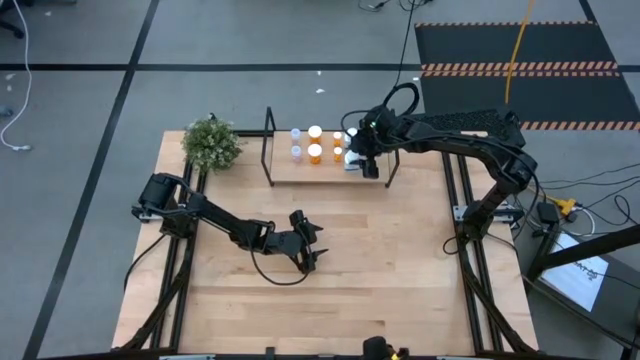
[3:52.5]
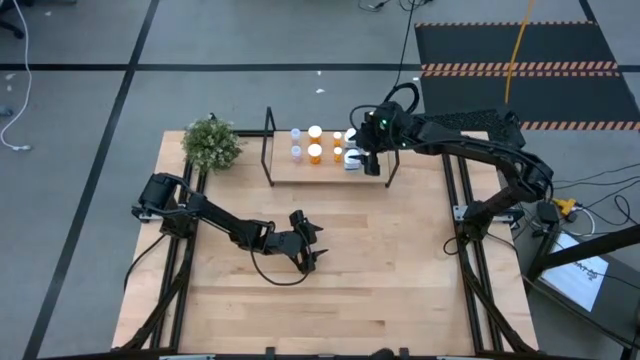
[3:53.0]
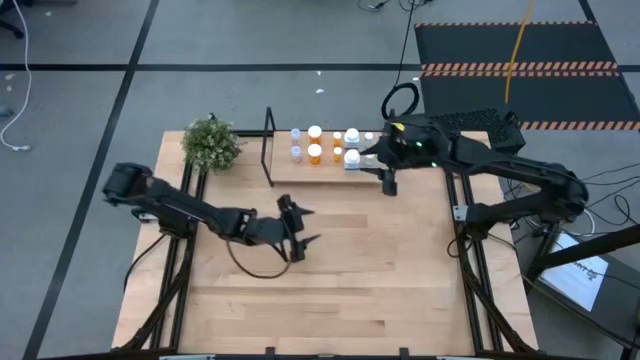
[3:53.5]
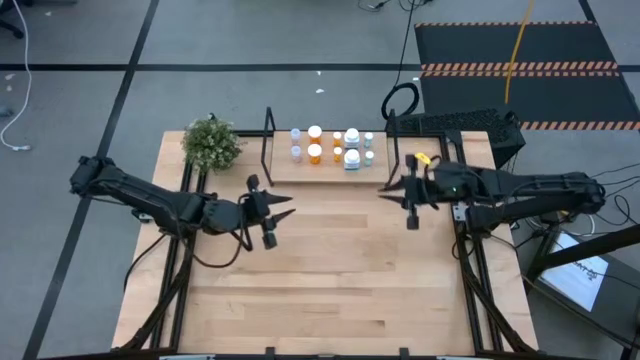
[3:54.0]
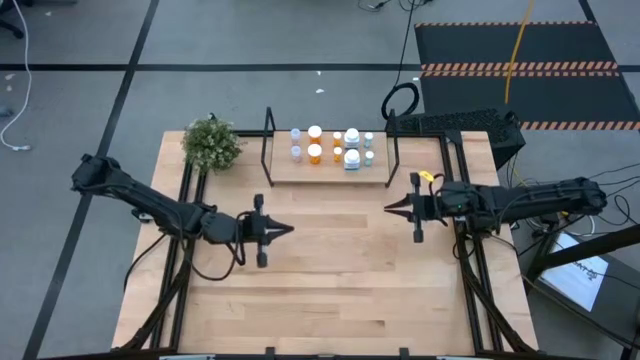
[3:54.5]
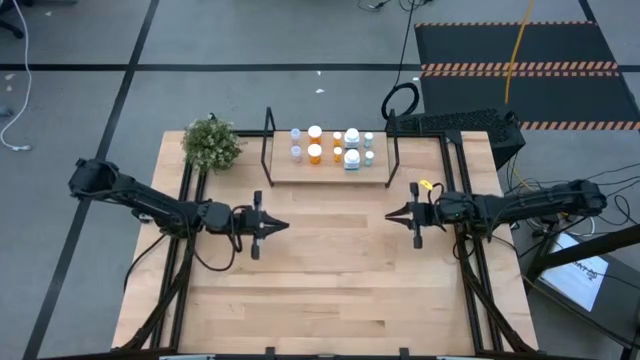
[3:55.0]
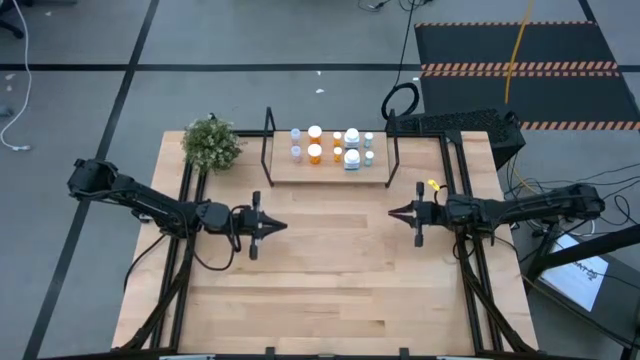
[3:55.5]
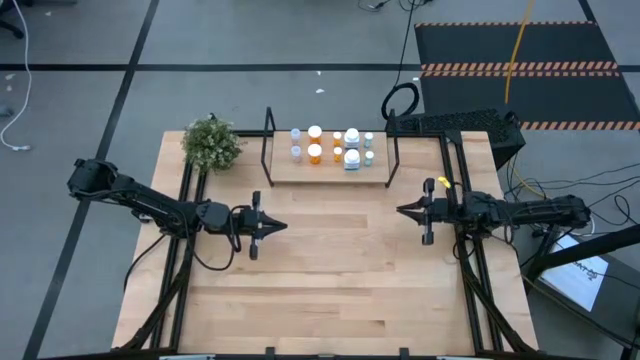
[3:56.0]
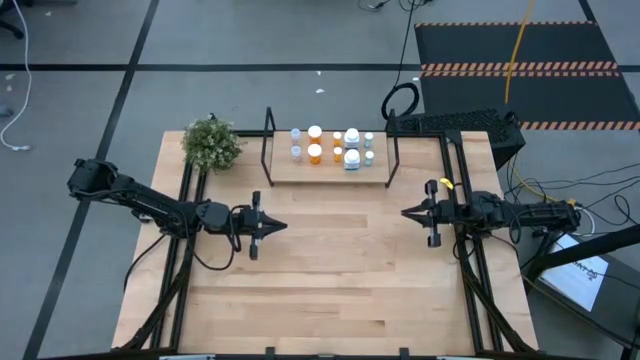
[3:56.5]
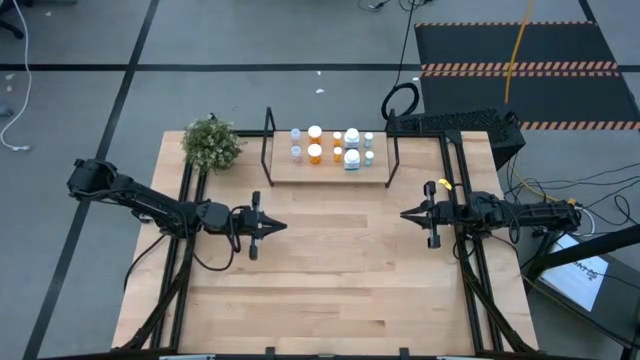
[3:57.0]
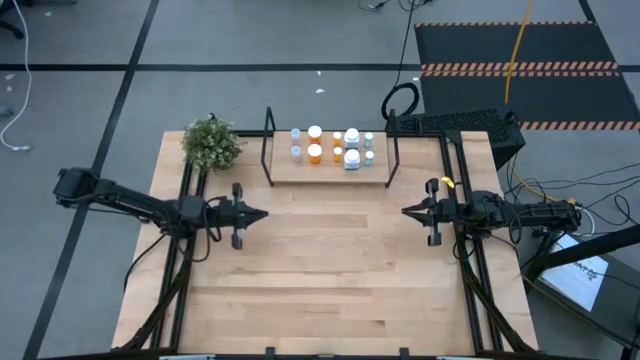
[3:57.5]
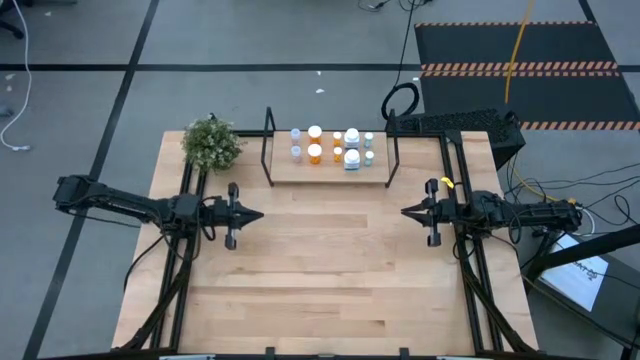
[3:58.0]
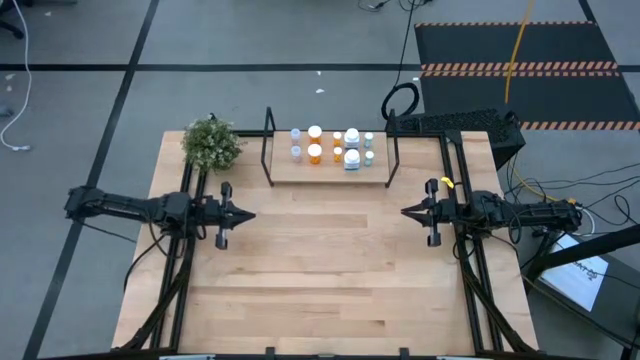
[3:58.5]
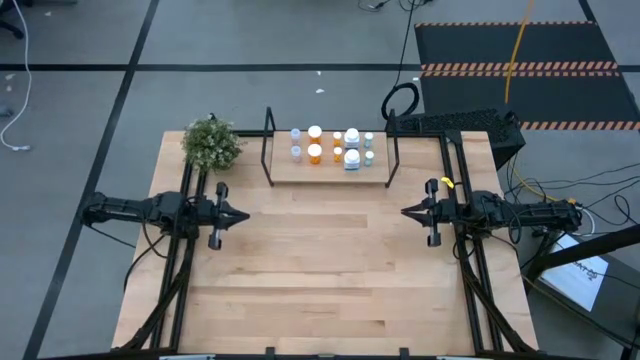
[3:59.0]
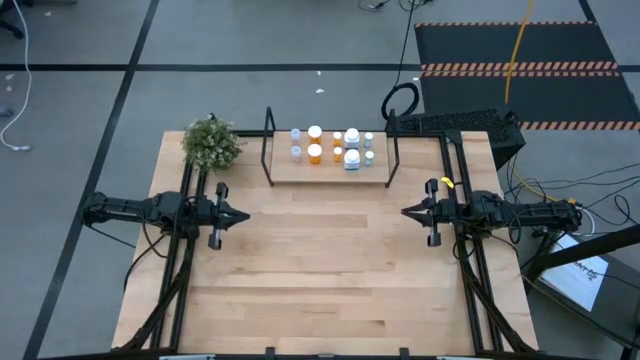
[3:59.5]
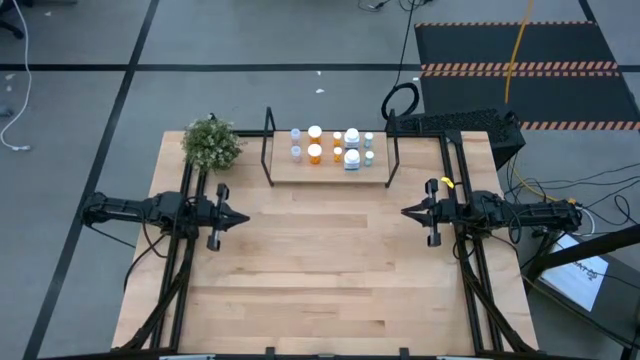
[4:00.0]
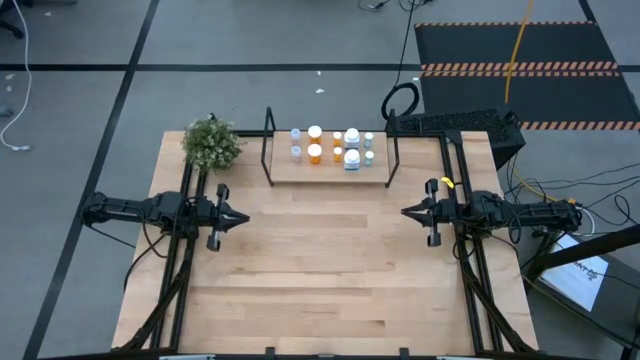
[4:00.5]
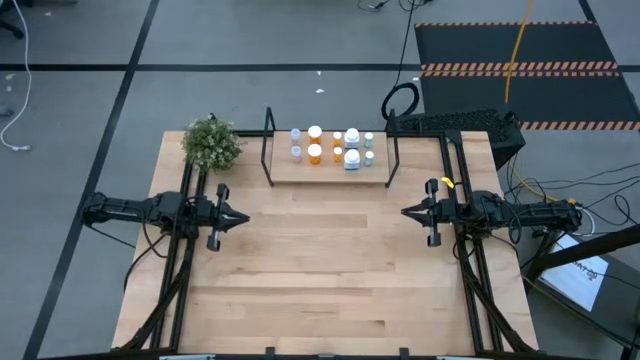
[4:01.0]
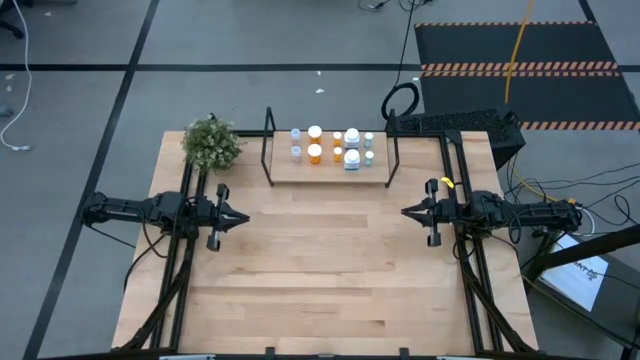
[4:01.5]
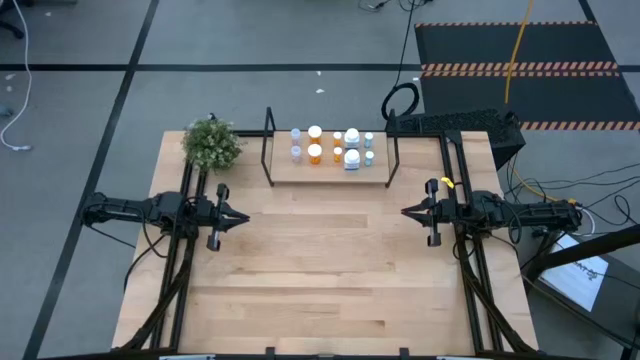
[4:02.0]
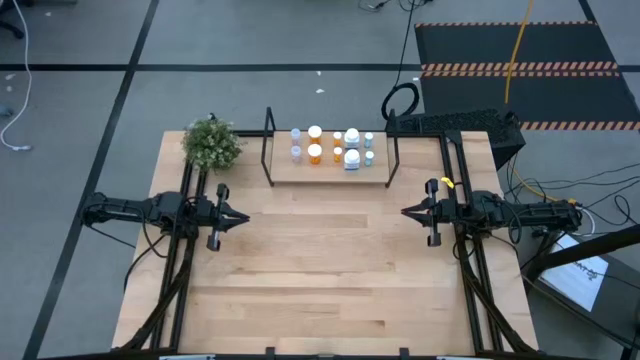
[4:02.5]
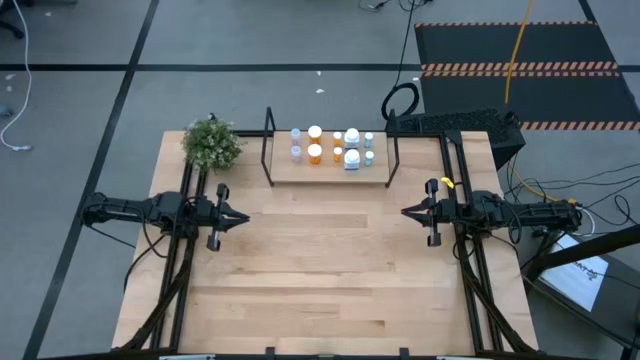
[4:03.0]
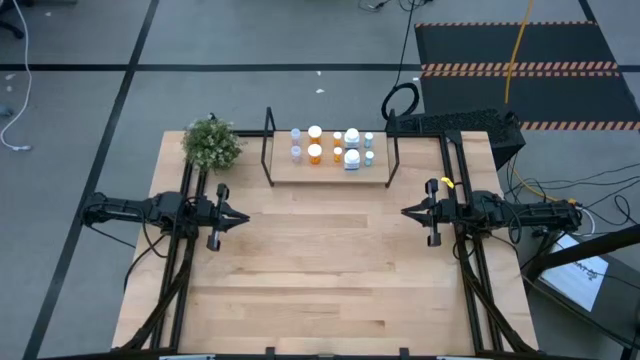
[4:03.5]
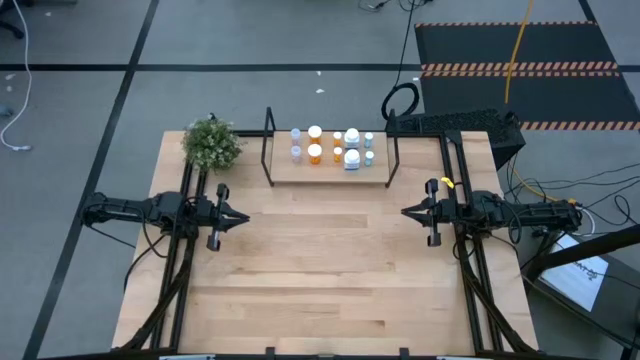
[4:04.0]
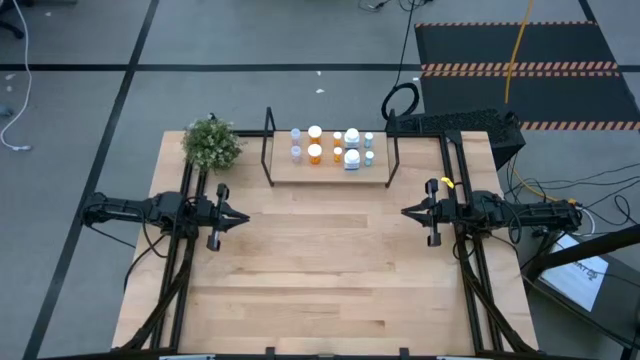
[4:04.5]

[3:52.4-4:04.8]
Task: Pick and place medicine bottles onto shelf by color
Return to Home Position

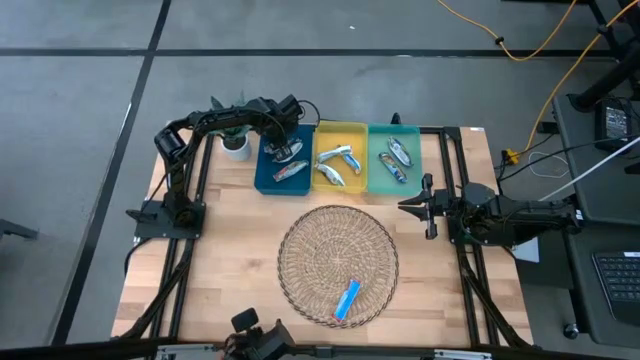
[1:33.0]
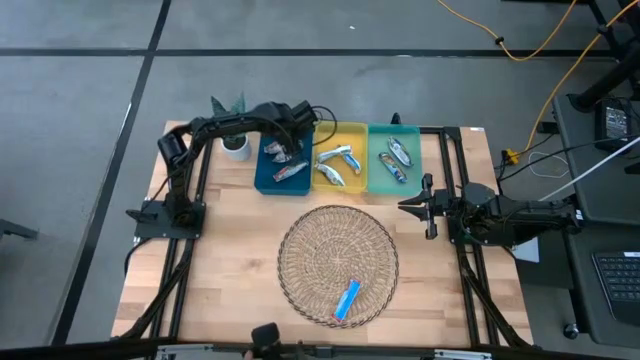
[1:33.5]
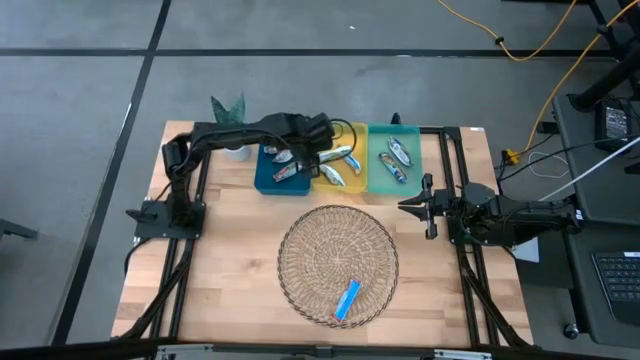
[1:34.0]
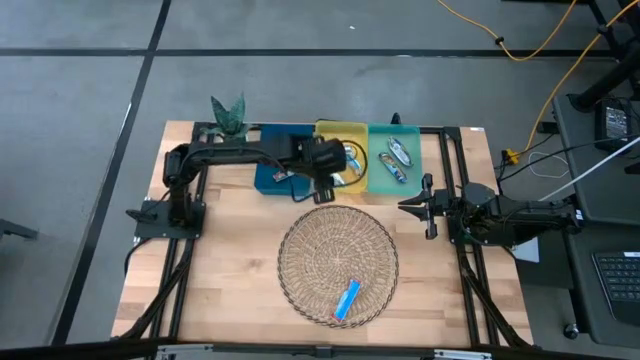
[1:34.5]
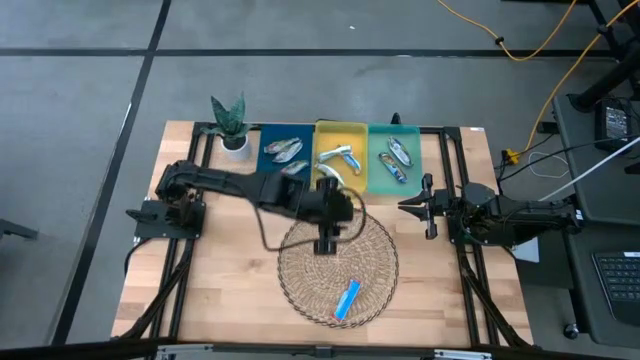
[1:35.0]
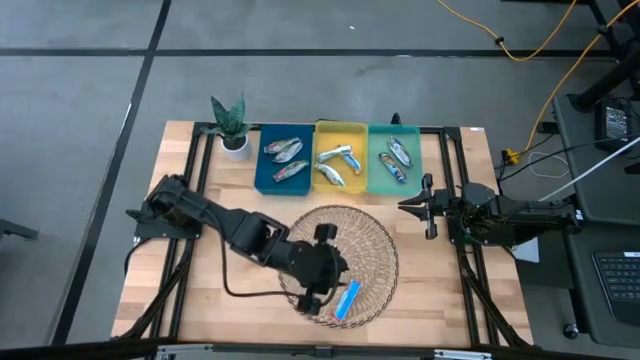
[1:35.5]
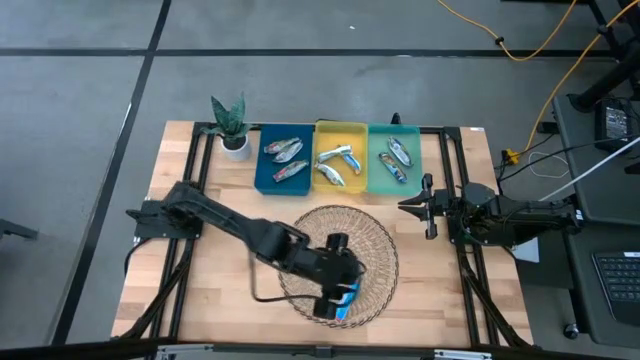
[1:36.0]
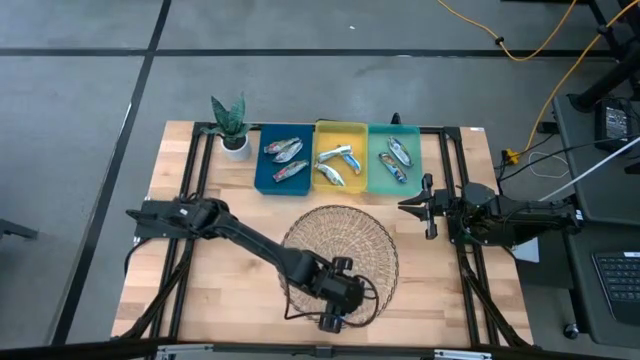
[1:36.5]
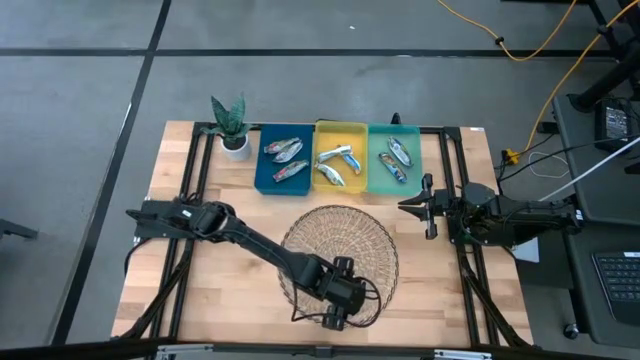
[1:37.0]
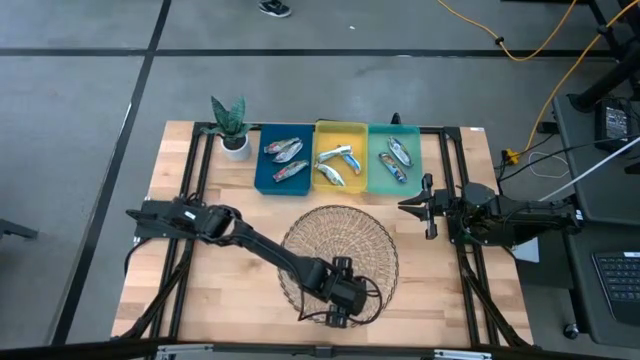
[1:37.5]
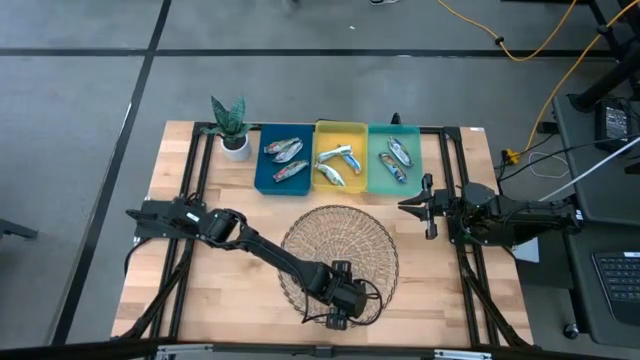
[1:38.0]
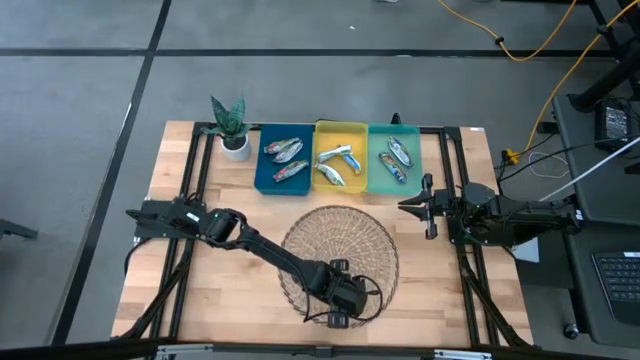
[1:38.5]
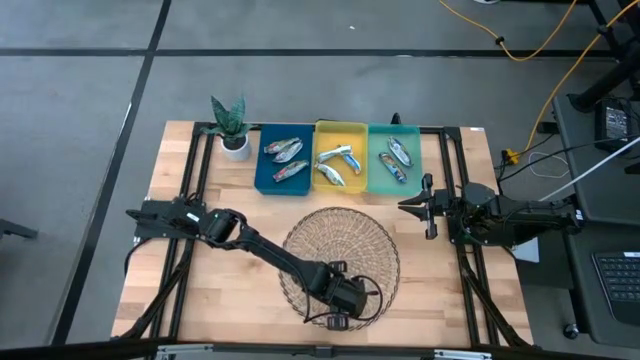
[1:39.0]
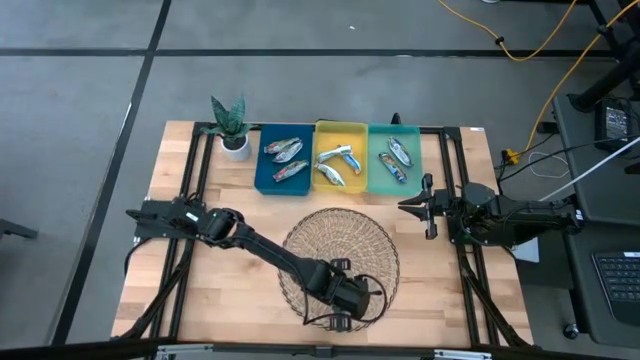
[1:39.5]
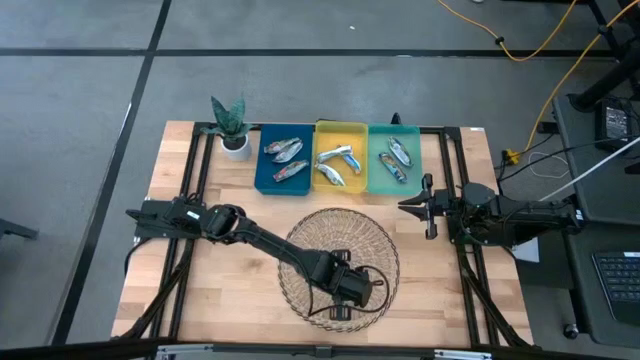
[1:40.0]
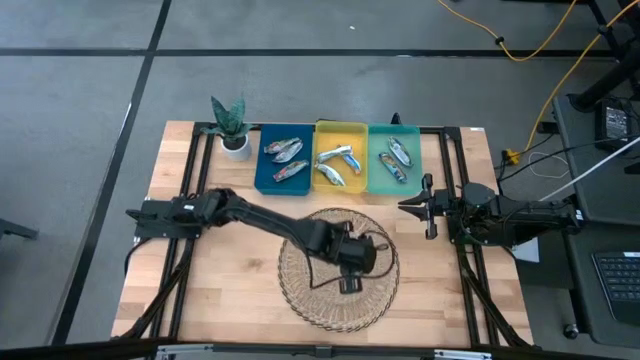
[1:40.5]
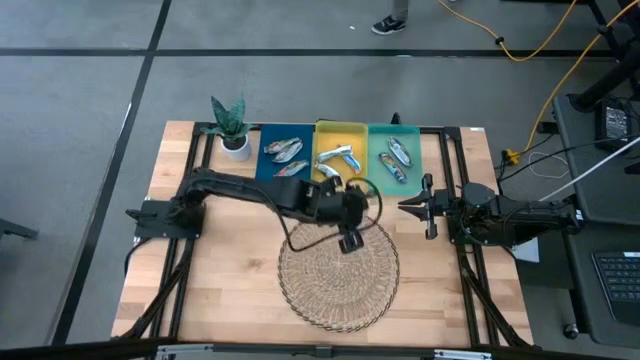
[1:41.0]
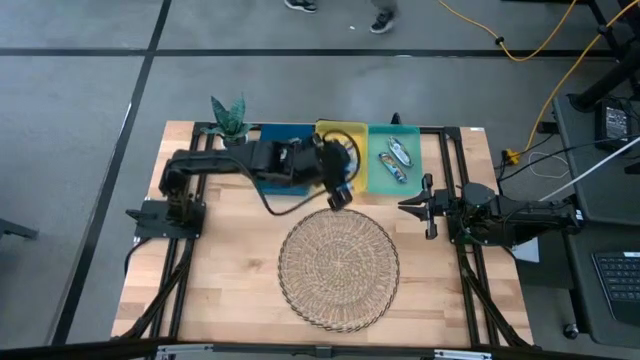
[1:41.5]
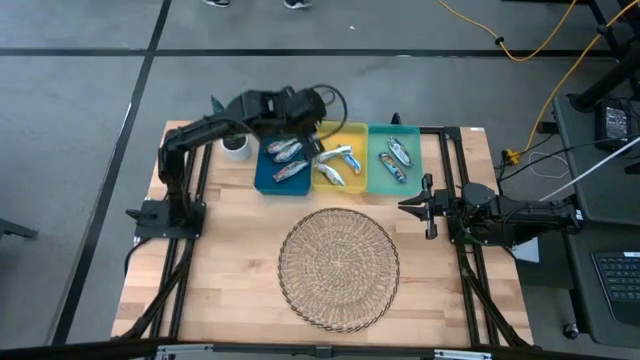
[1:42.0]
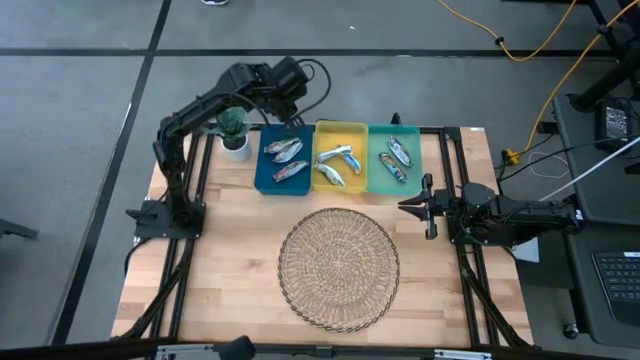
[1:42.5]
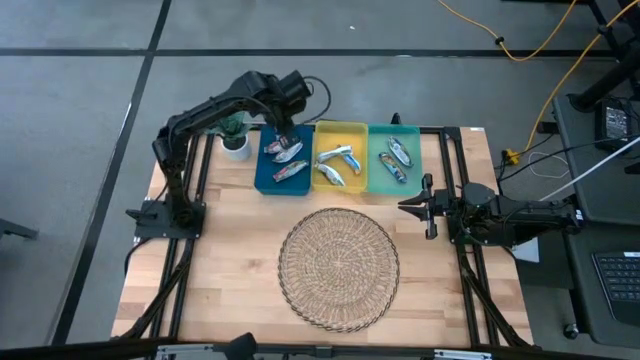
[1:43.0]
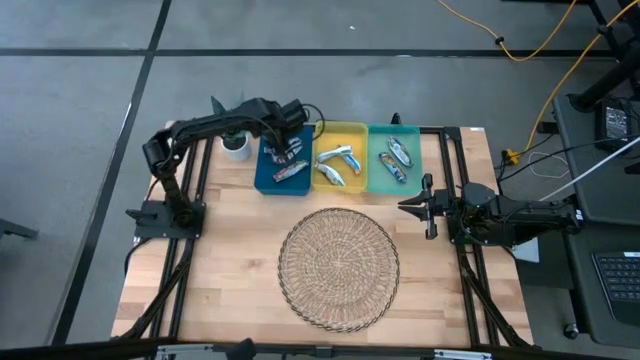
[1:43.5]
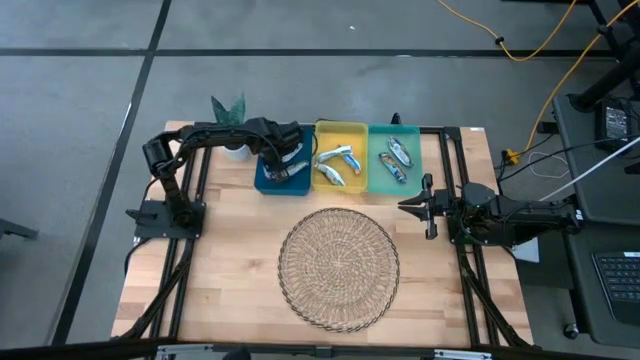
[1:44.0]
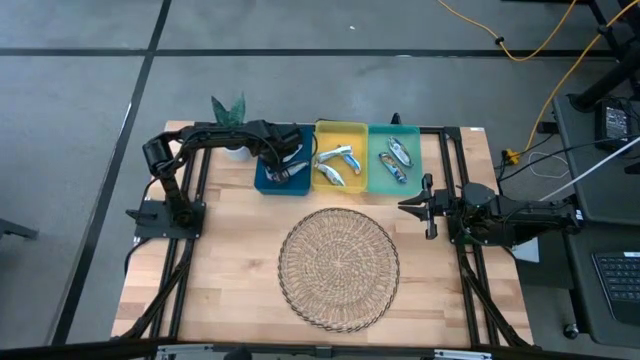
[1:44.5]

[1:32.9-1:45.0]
Task: Pick and place Granola Bars by type
Put the red granola bar into the blue bin
